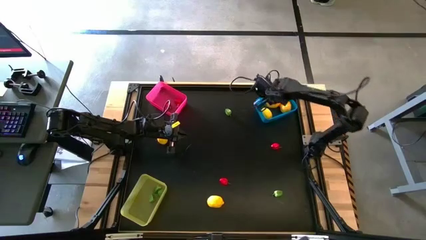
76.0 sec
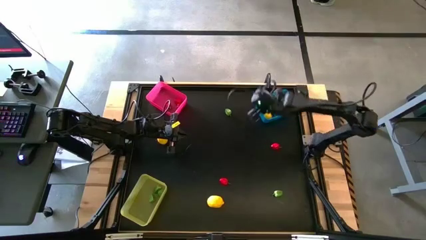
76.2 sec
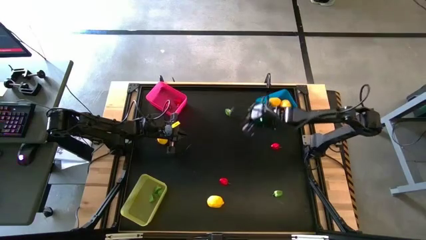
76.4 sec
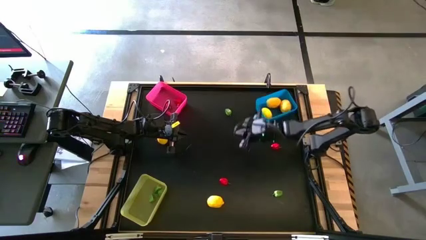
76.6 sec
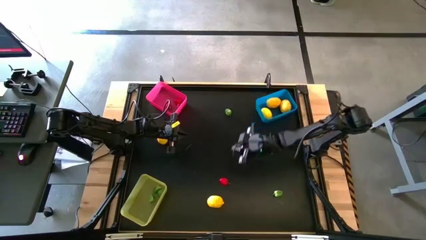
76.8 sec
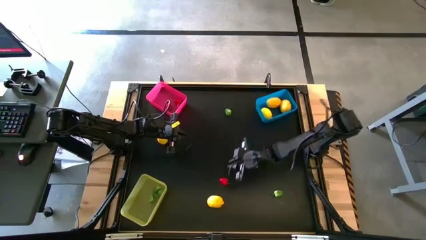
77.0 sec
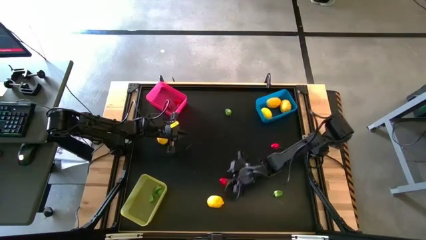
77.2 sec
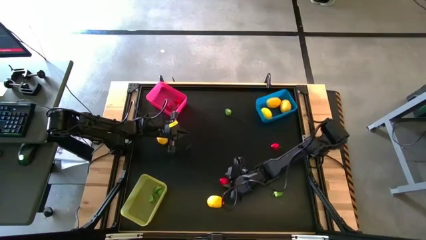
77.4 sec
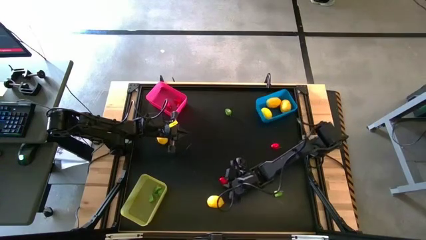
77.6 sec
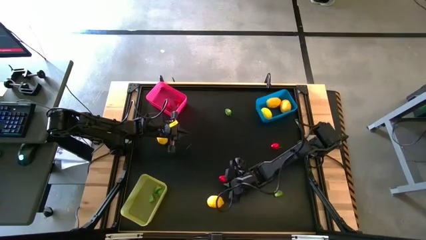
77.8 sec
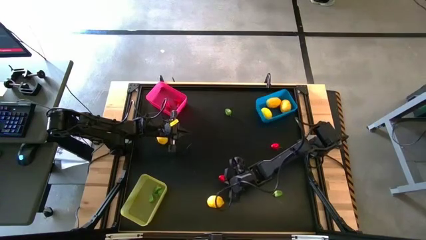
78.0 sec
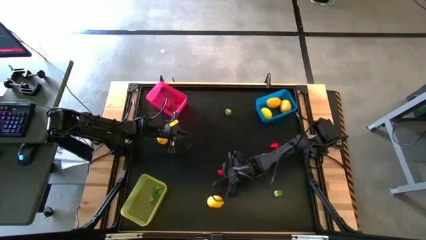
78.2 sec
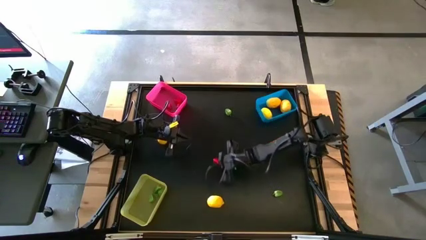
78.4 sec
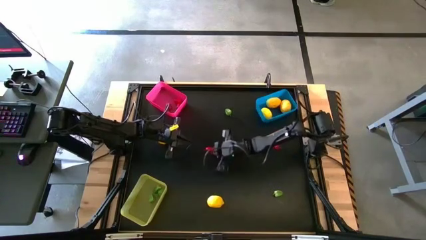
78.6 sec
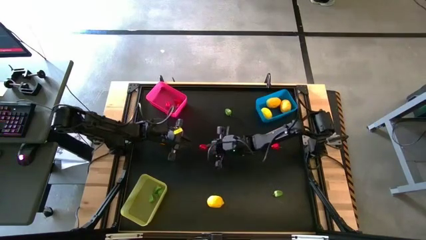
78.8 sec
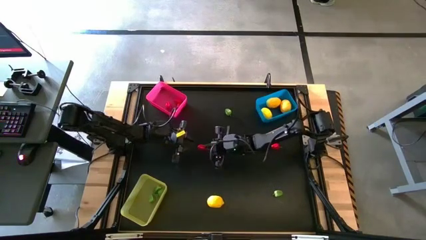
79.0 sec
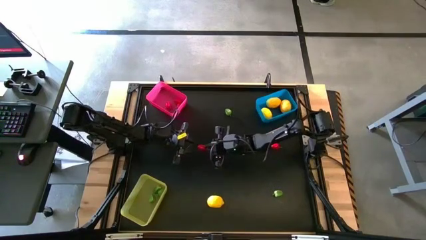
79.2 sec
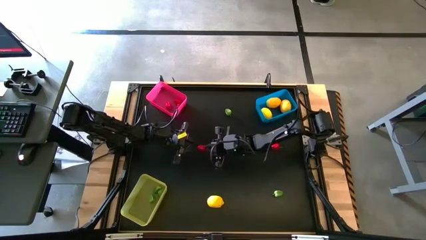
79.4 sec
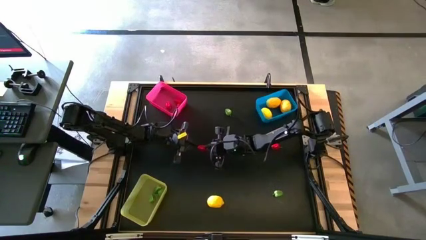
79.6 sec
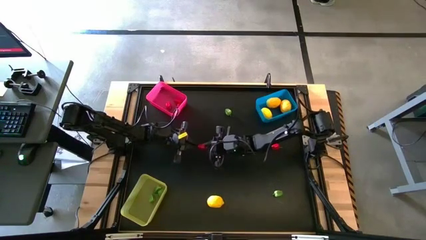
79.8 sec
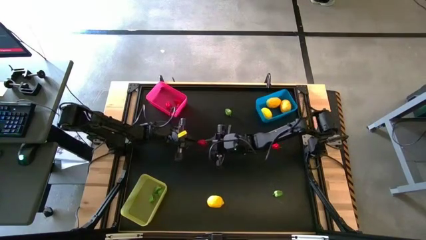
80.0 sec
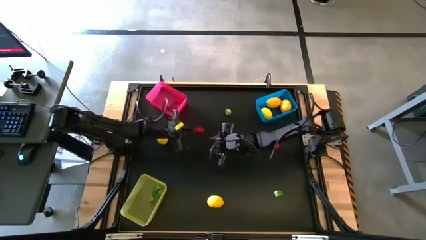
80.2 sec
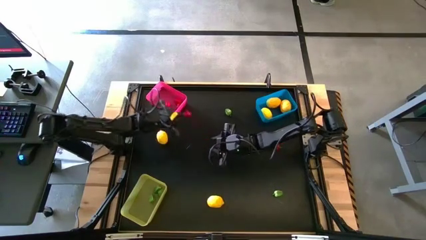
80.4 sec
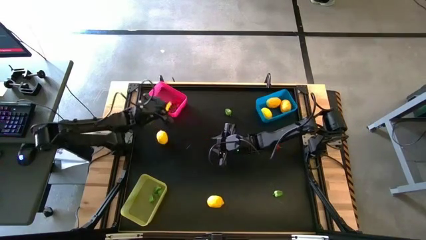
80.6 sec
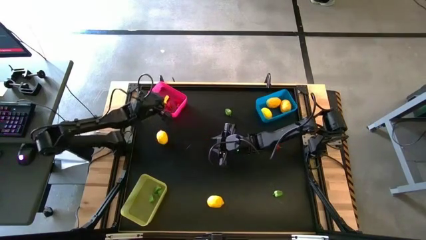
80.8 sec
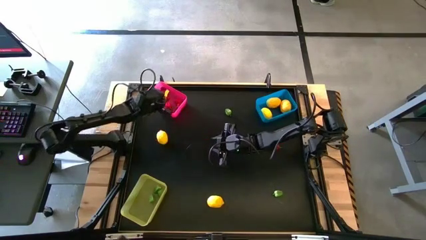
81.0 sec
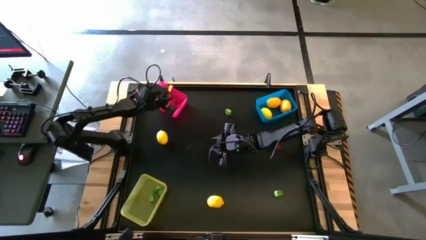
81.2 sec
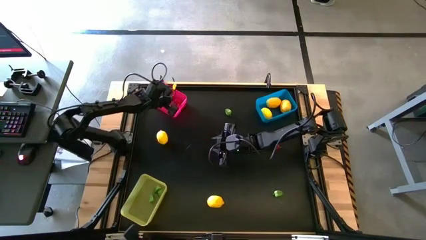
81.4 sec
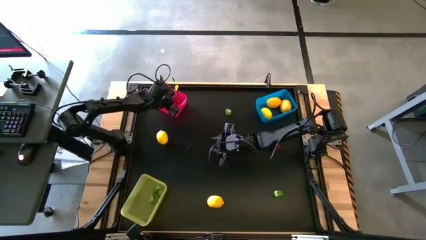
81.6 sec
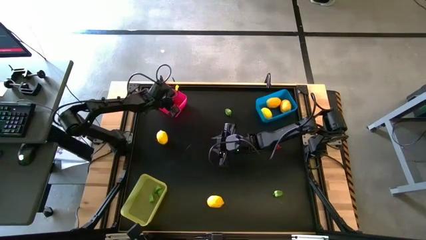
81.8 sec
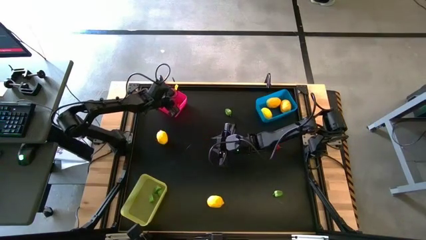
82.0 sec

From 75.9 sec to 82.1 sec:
Task: Sort produce into baskets
Put the red bell pepper into the red bin

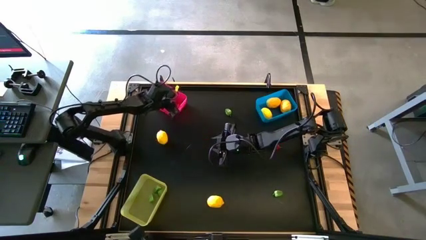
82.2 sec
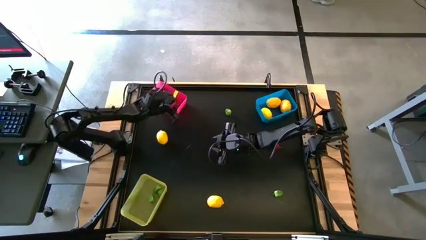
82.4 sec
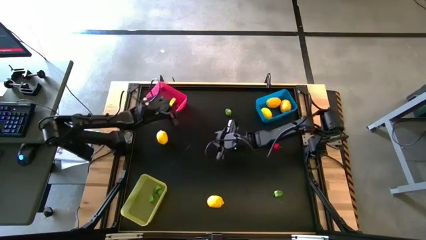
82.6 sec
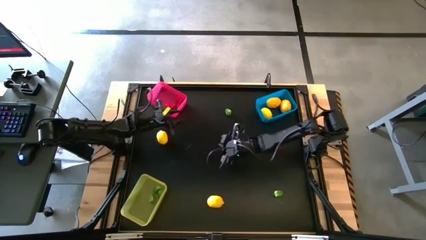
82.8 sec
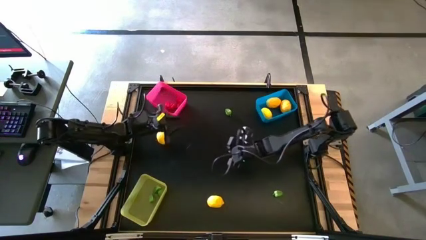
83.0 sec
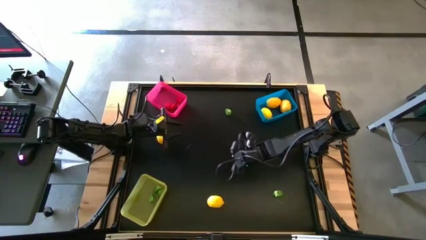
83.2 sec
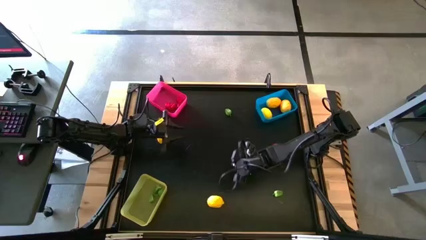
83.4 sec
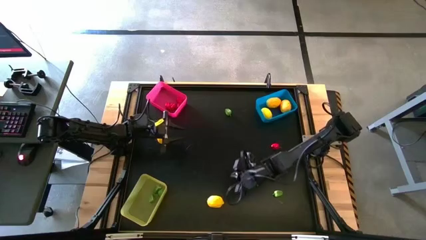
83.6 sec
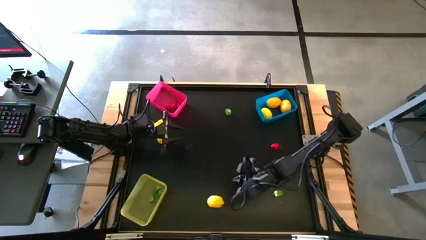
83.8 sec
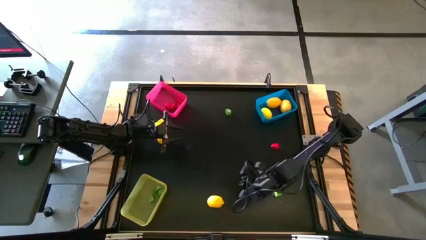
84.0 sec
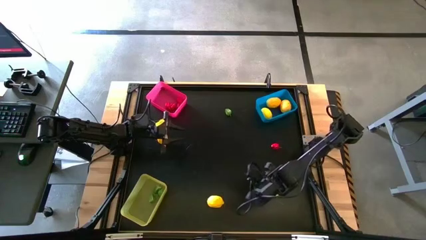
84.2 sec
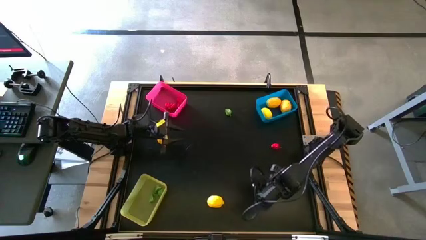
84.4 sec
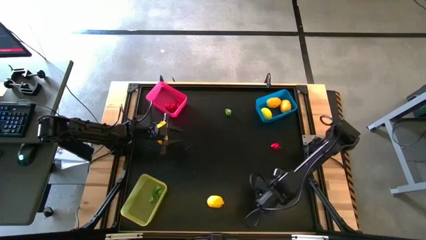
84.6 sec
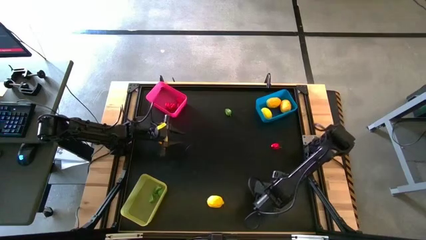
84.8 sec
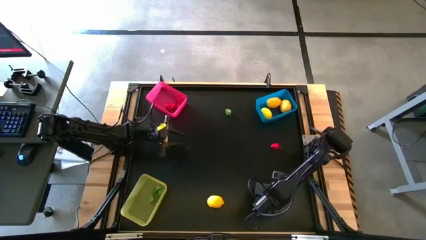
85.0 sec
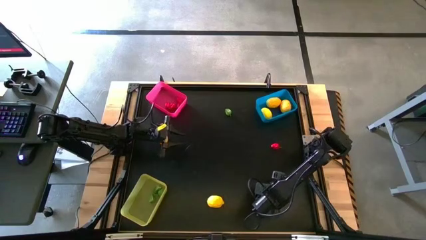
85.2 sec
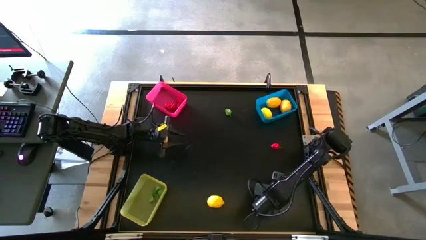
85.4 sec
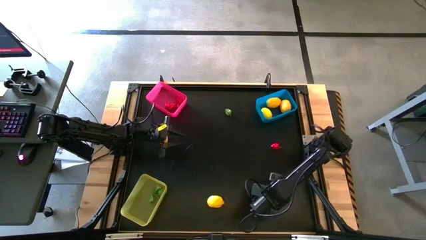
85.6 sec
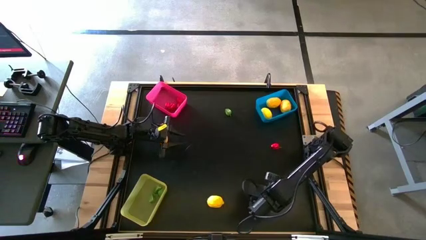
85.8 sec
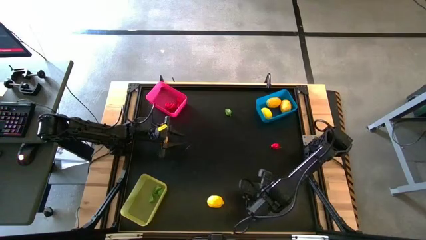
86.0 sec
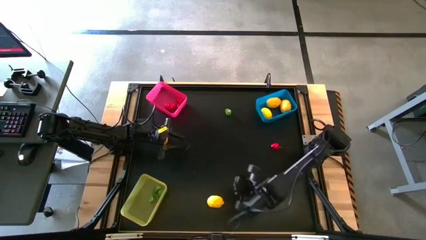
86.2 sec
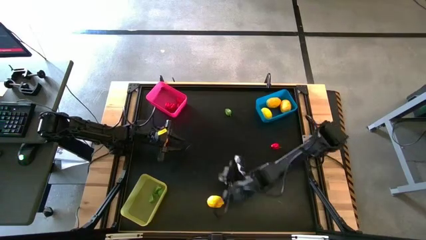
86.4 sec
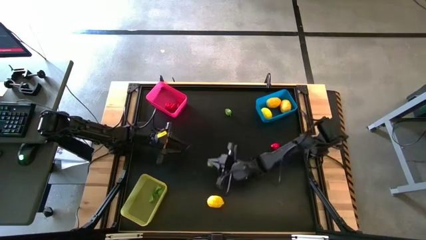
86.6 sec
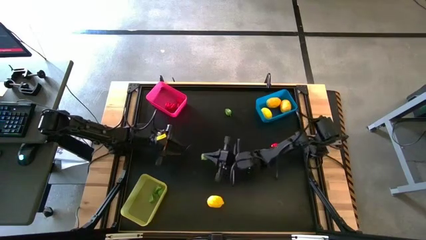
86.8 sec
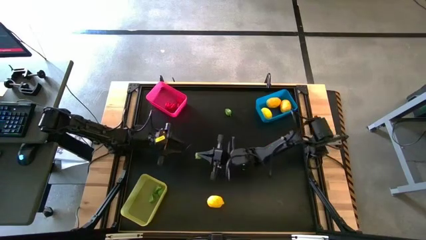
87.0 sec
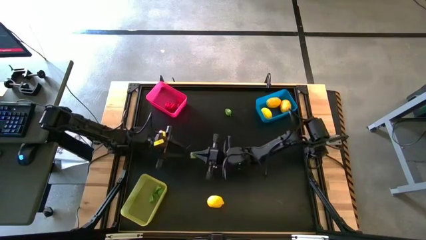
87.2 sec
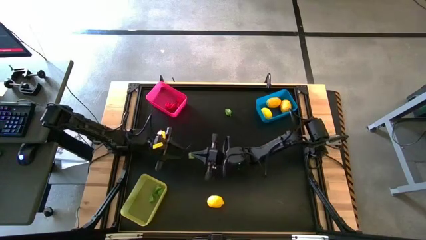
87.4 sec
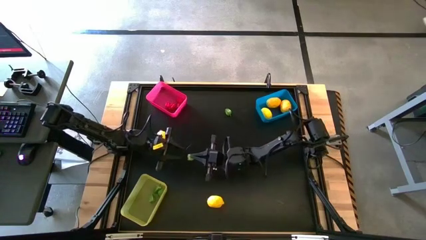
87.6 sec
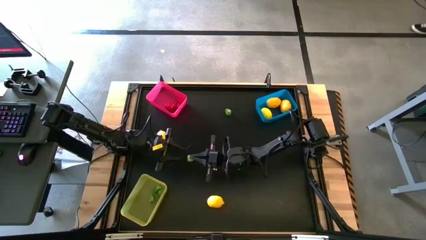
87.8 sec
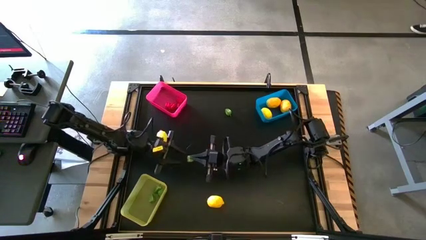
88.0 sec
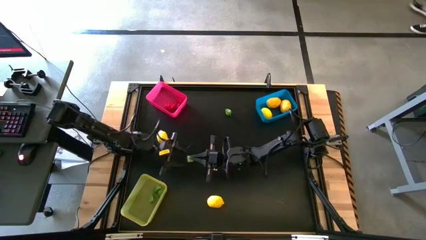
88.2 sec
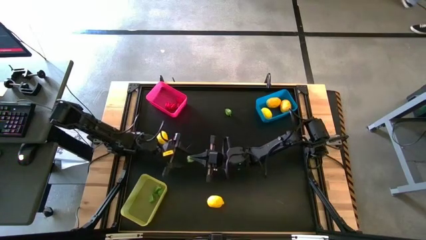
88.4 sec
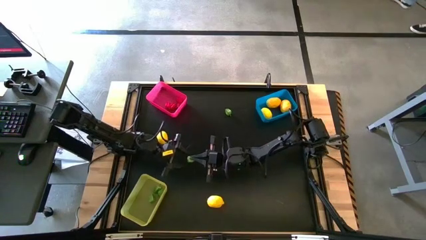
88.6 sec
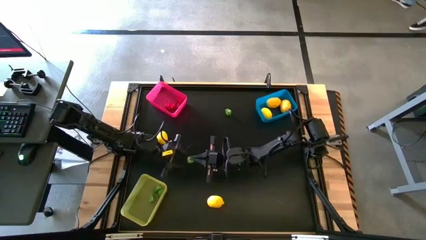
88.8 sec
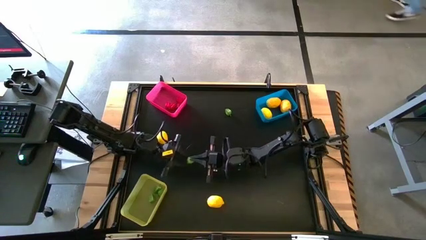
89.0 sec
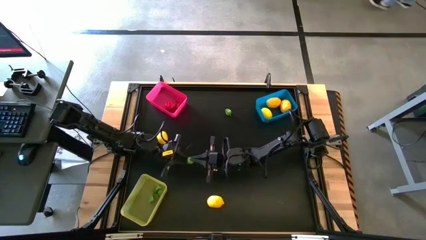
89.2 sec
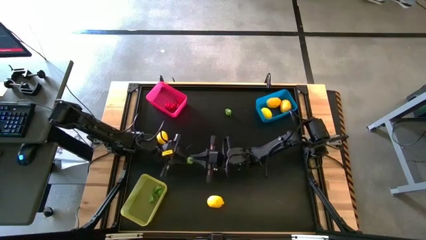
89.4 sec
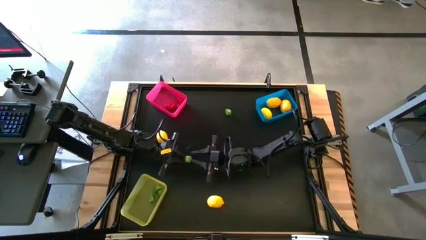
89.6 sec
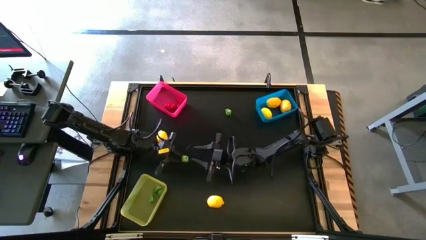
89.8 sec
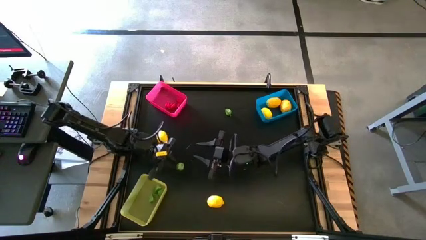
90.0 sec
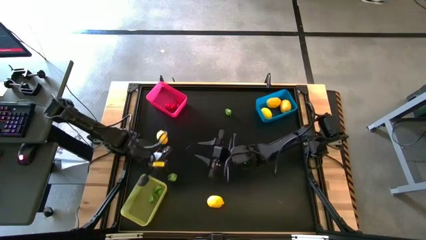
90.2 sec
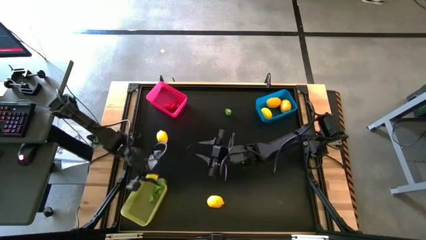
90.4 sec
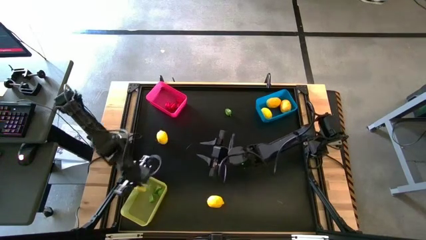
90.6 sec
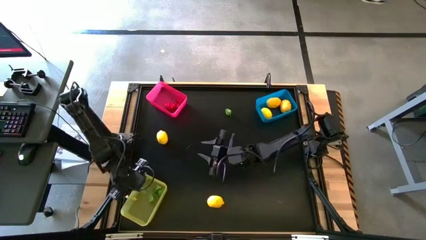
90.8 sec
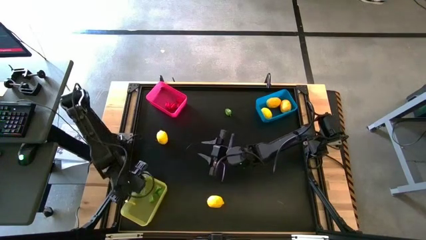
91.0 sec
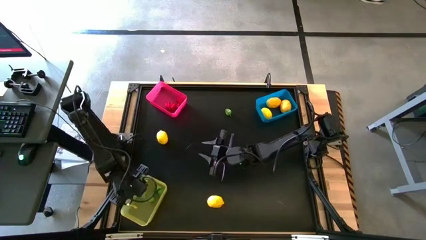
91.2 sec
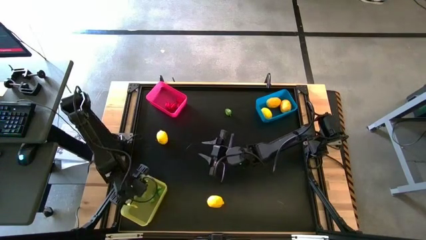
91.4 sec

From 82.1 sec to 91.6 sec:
Put the green bell pepper into the yellow bin

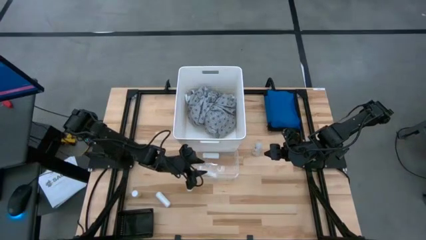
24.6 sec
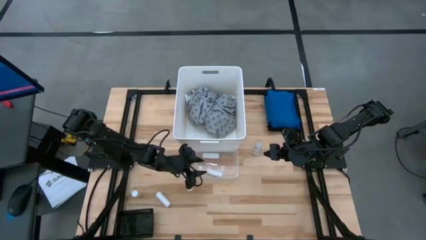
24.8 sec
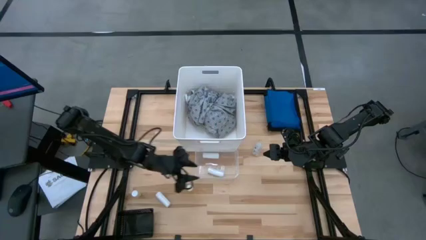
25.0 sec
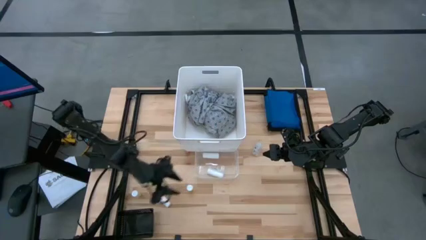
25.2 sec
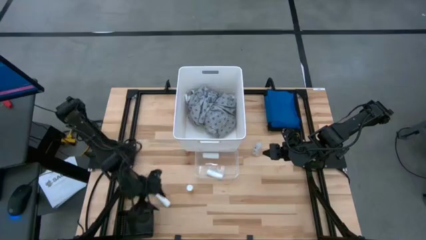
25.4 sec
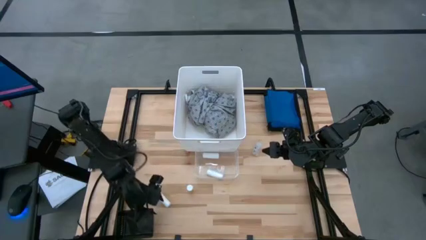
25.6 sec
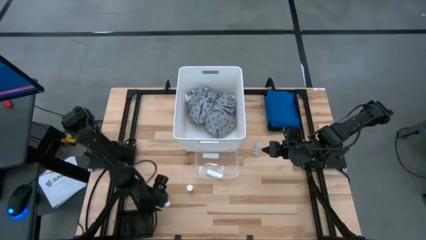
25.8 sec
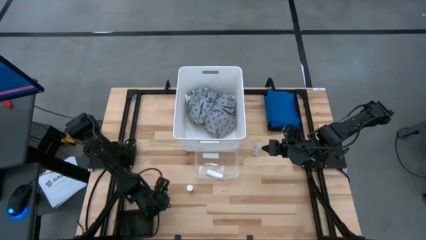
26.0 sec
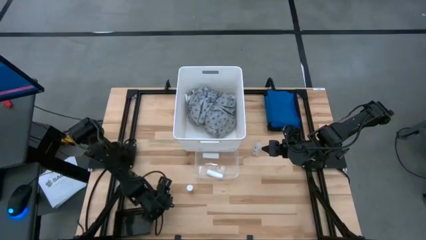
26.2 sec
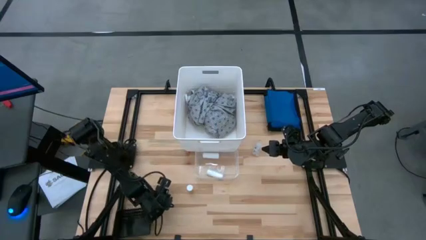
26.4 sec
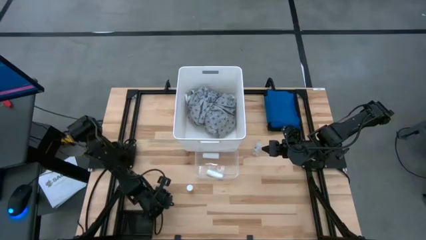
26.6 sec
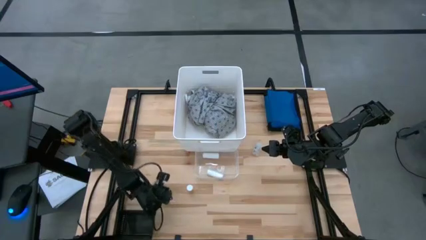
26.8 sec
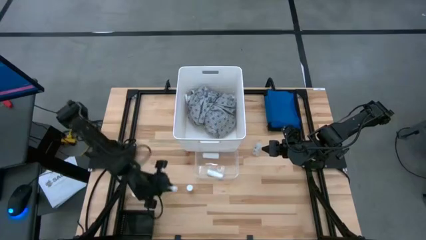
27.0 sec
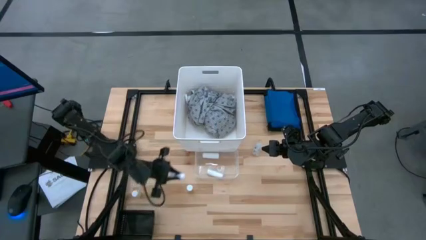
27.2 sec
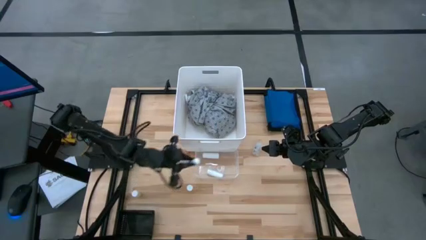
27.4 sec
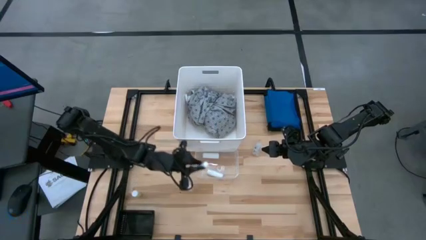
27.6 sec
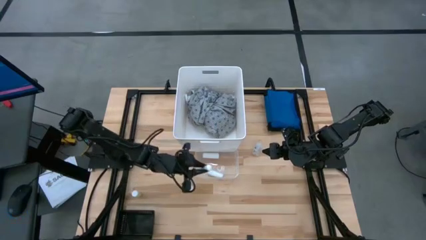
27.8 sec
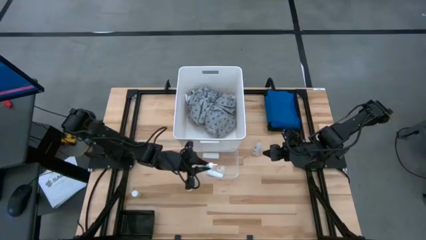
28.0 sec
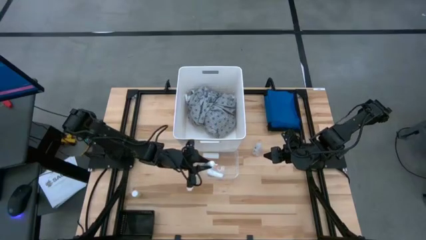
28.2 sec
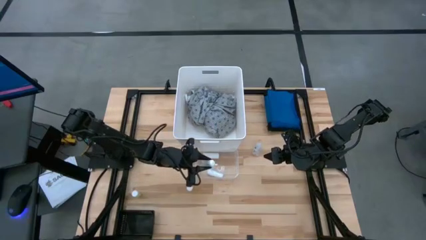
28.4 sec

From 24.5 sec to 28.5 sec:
Task: Pick & Place Medicine items
Put the rolled gauze into the transparent bin
